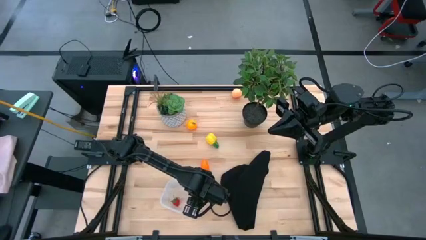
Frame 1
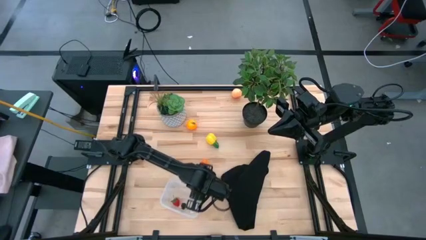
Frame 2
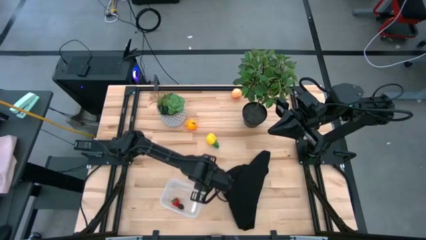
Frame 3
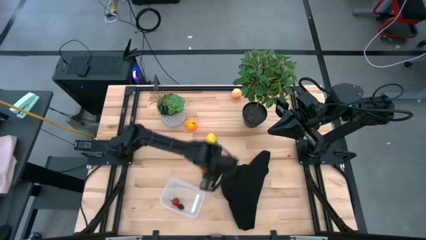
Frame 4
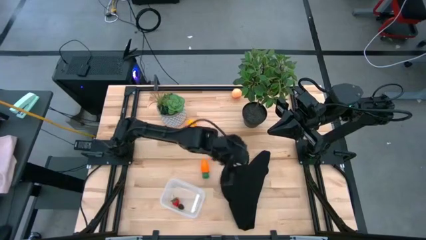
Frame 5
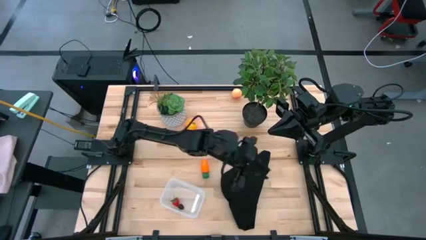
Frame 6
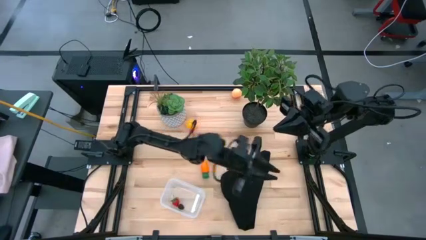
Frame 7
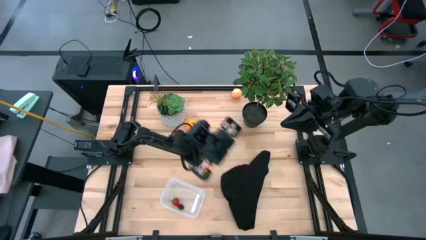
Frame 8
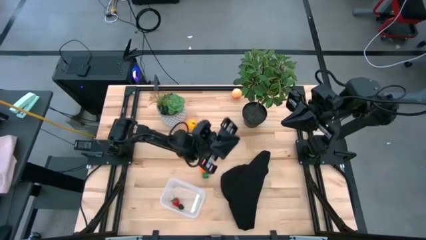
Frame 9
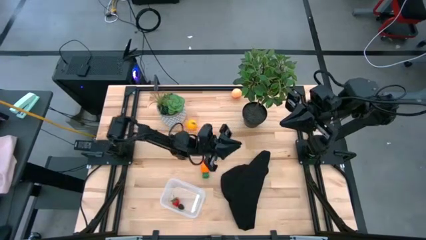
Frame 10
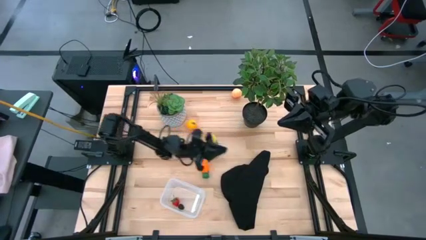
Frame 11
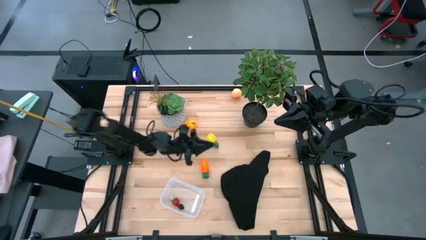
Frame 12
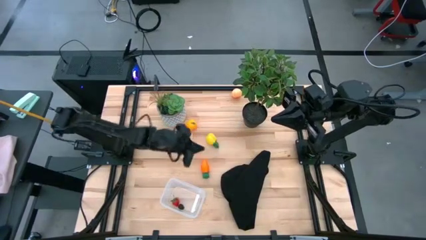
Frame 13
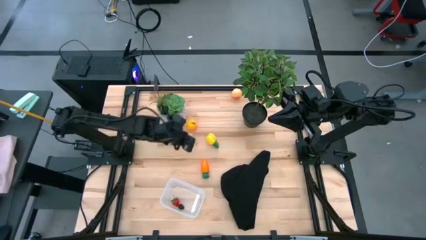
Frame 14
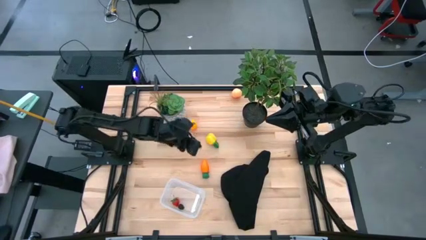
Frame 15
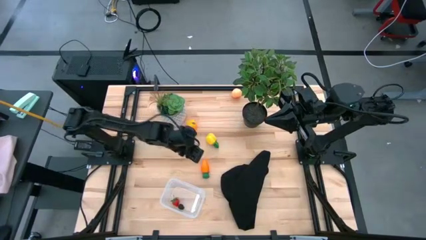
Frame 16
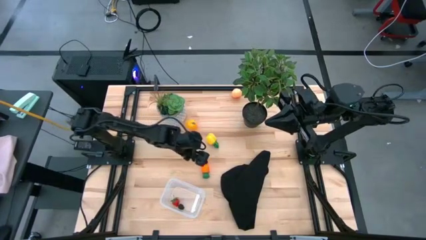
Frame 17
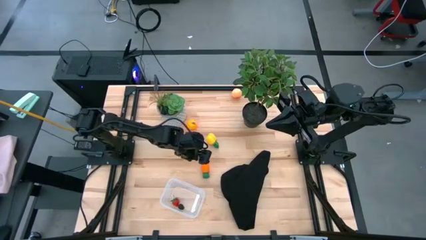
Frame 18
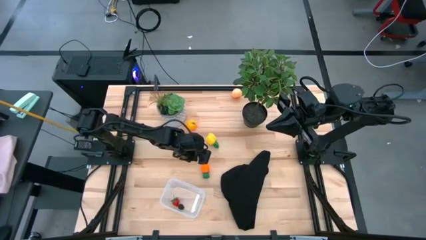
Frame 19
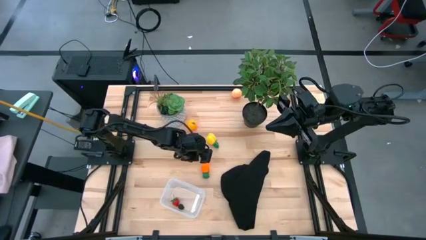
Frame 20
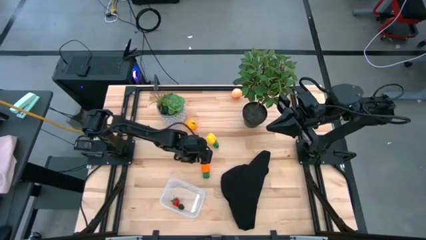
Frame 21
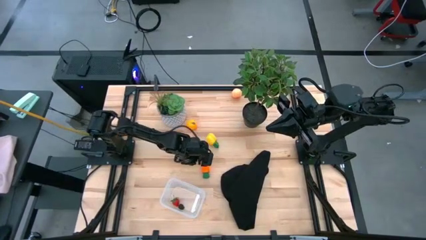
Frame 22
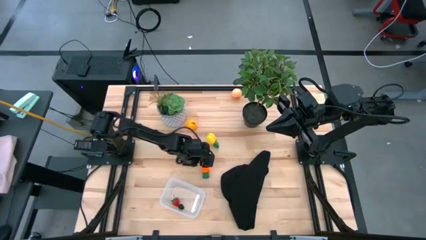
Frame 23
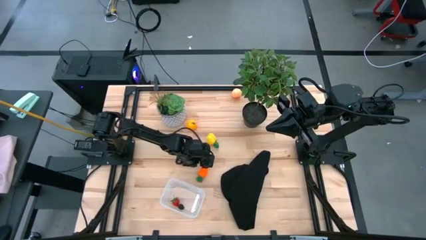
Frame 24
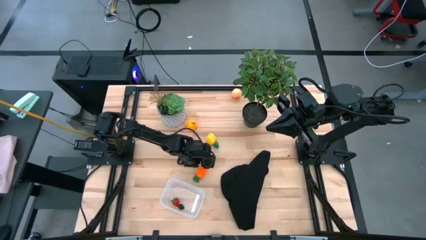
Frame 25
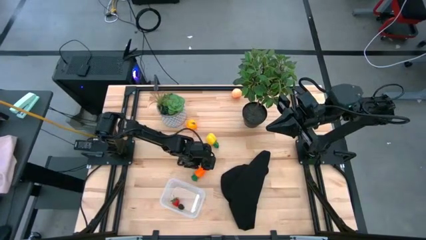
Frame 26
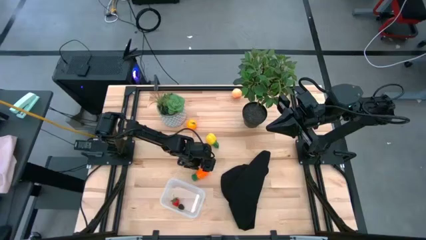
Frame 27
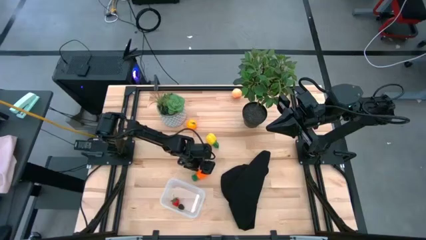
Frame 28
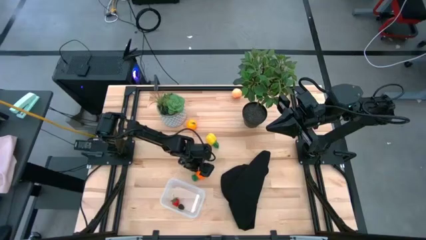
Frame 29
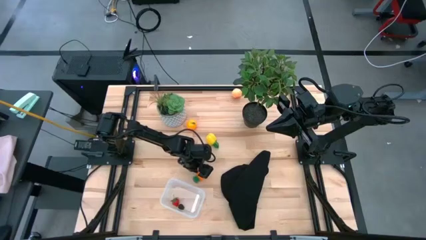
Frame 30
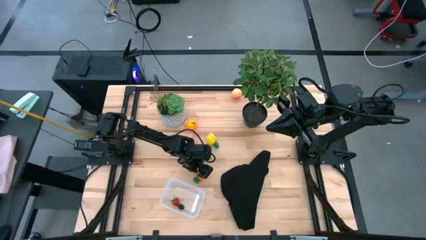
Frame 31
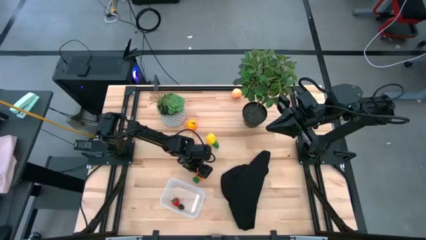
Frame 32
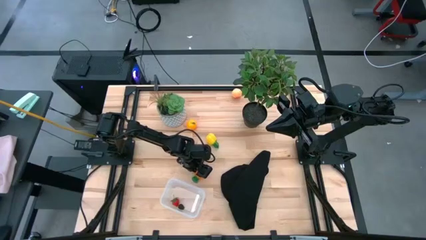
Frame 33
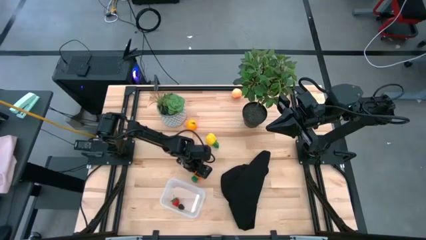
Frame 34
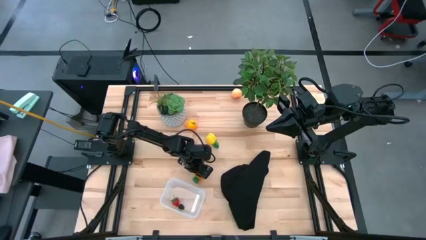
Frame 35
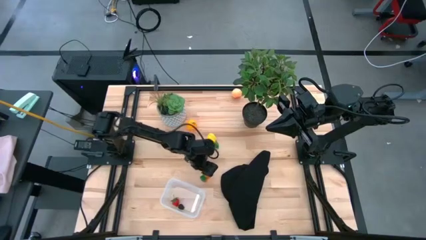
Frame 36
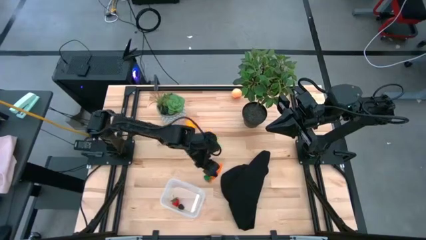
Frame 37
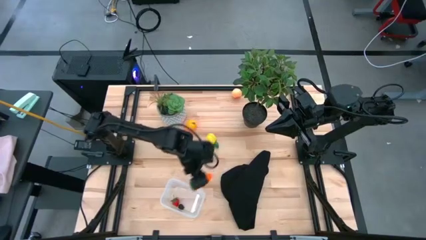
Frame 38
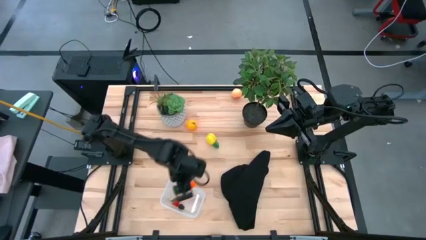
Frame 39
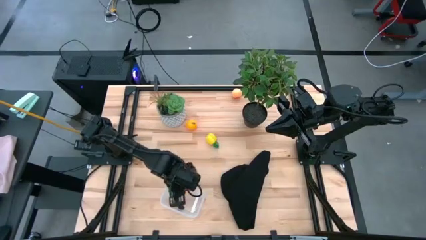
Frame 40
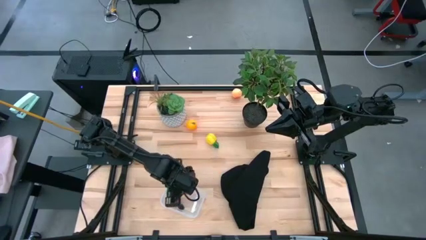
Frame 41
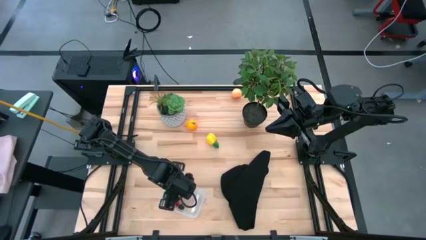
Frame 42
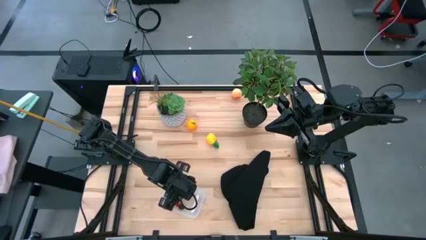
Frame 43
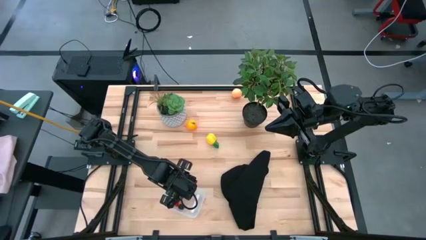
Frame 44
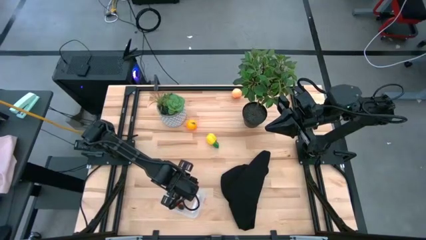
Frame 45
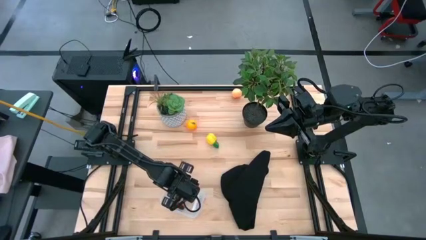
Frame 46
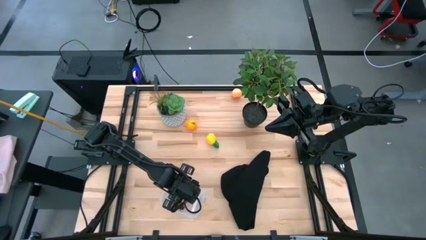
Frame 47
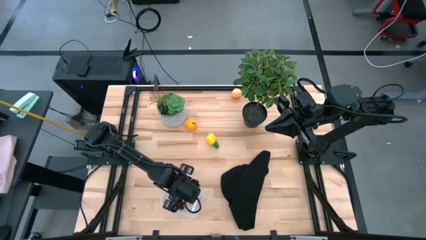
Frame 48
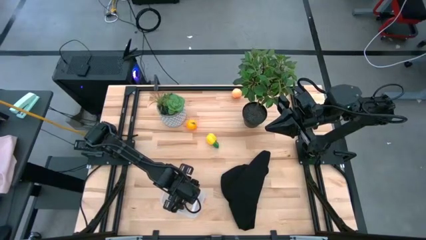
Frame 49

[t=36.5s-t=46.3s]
Task: Pick and placing Produce into tupperware
Put the carrot into the transparent bin

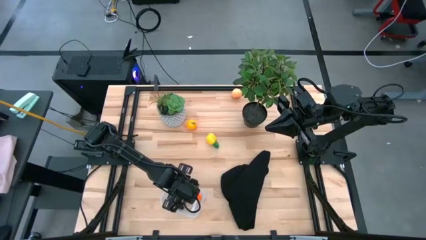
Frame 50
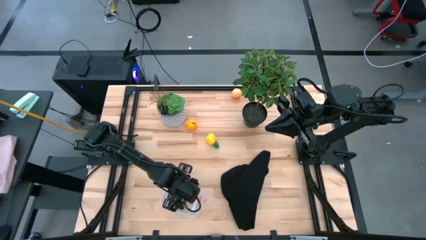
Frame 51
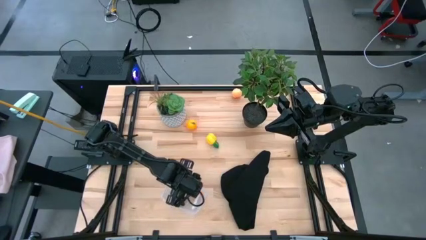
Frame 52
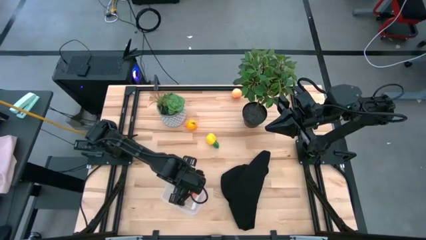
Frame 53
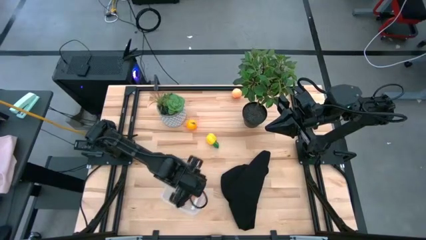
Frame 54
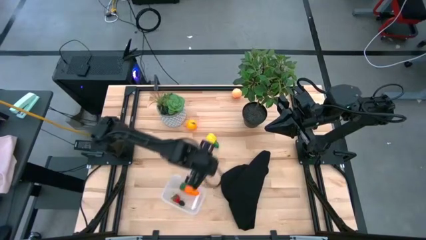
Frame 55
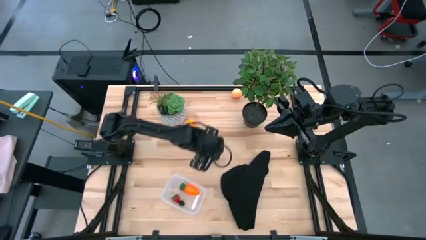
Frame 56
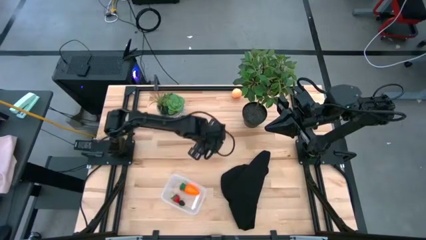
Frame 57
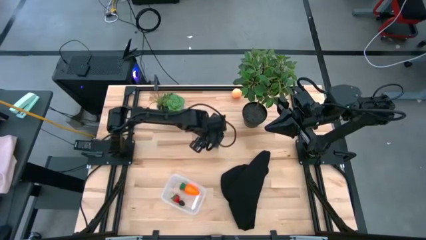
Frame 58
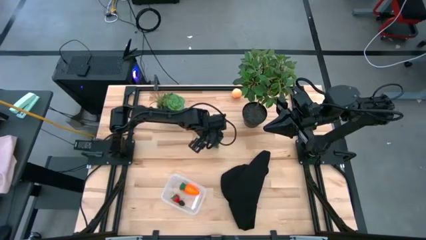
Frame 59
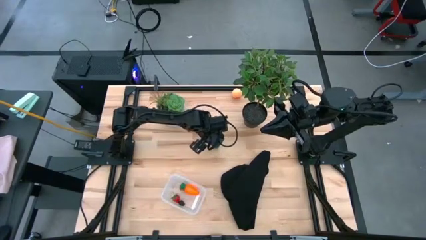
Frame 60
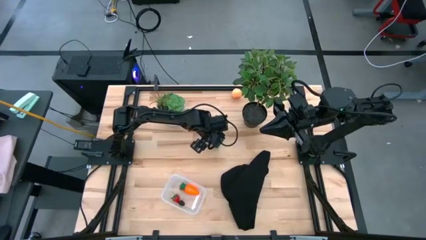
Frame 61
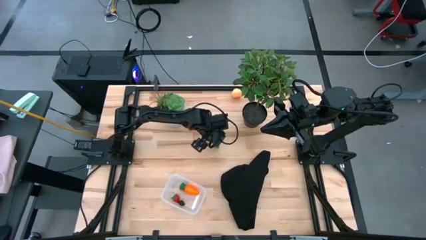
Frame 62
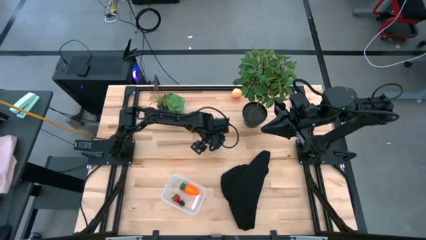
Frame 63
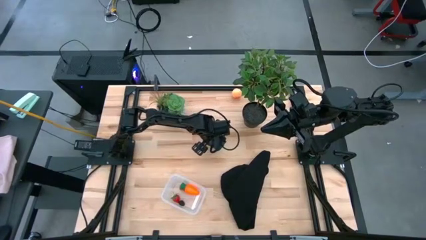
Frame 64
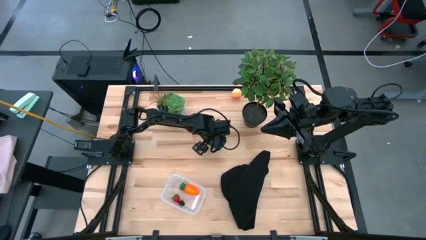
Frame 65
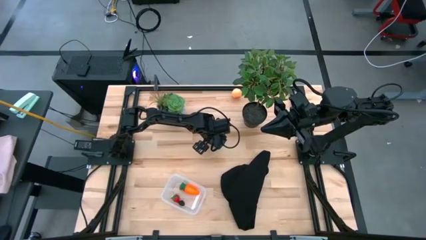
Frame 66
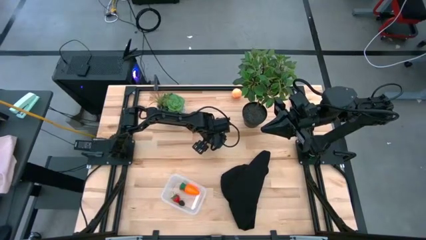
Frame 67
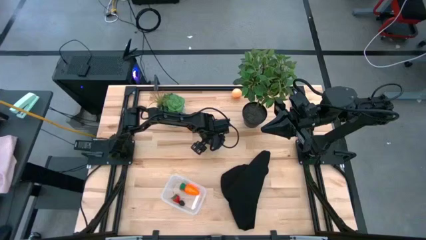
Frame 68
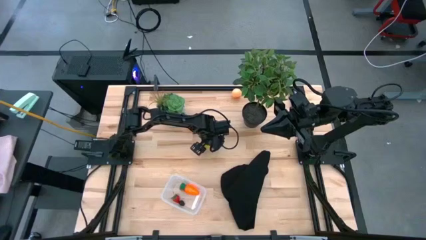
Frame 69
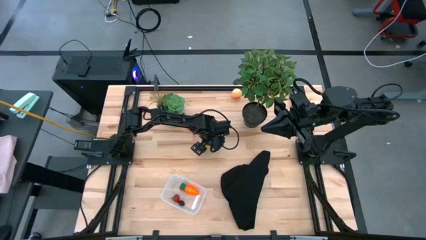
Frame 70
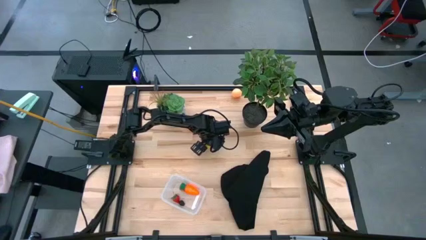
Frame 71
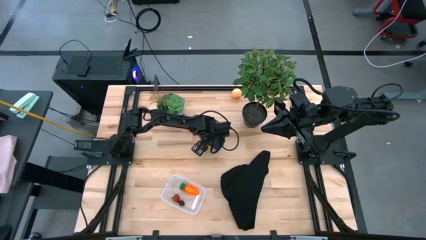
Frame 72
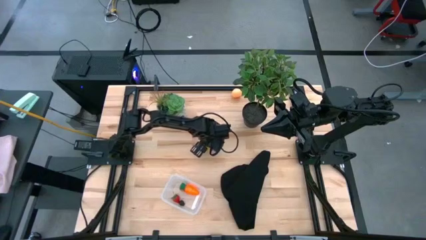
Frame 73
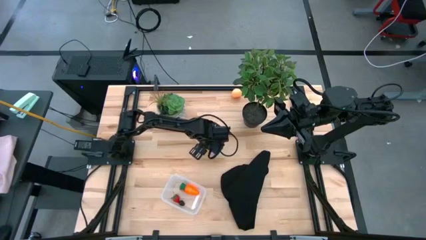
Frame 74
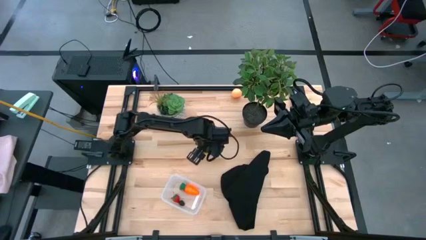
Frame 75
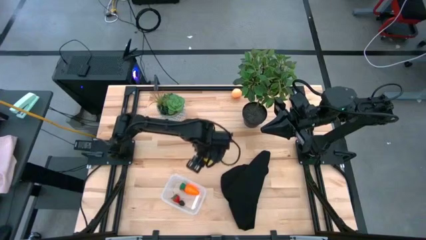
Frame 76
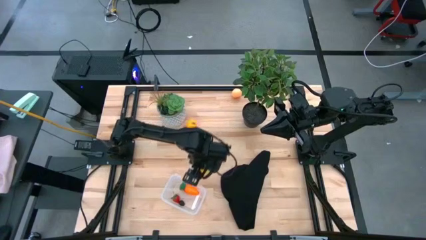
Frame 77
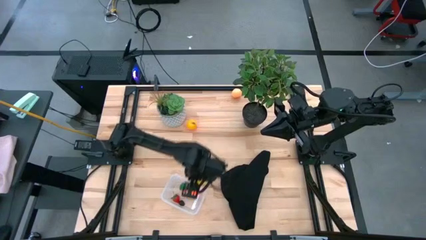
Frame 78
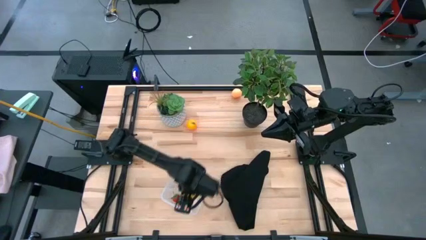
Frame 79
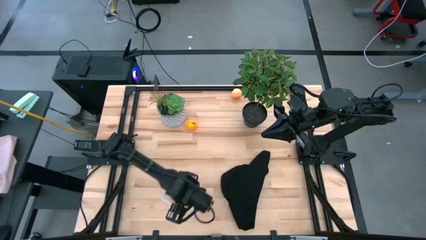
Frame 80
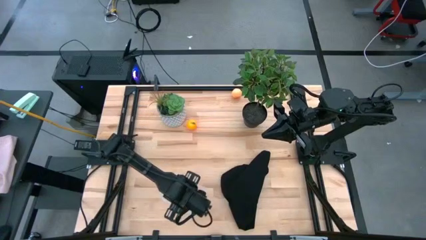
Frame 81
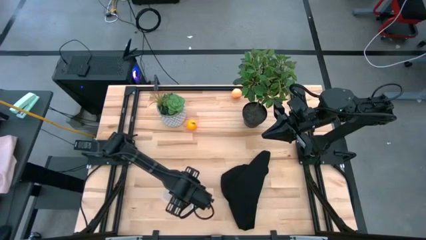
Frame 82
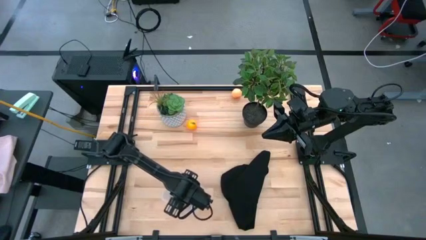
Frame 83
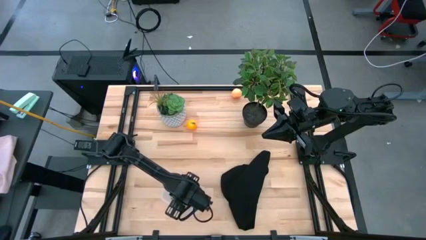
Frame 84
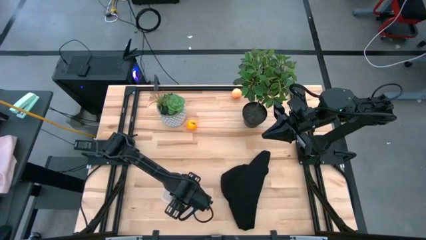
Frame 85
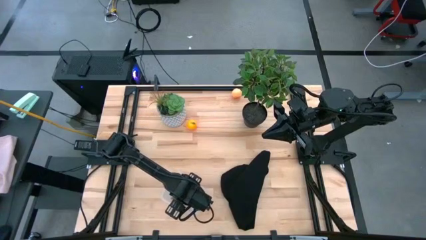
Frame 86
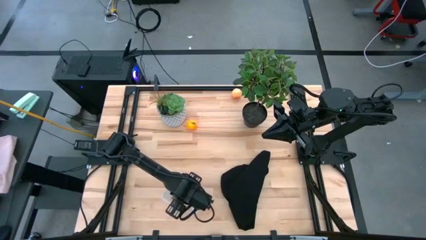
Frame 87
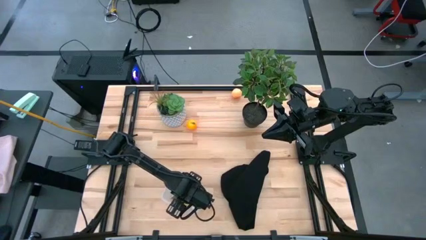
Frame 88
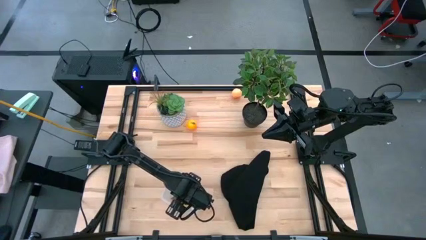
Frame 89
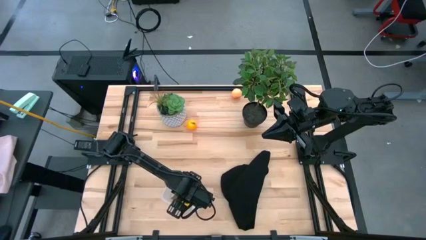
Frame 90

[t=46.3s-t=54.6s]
Put the pineapple into the transparent bin
